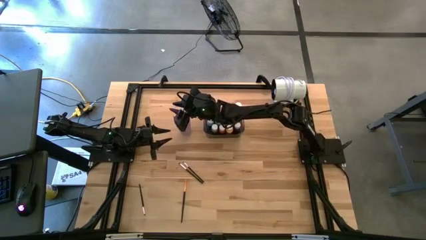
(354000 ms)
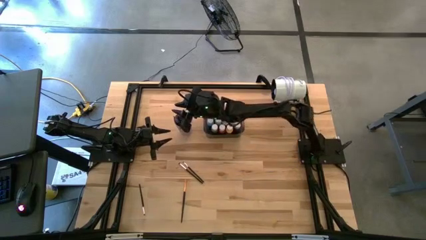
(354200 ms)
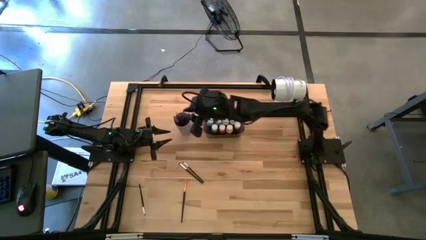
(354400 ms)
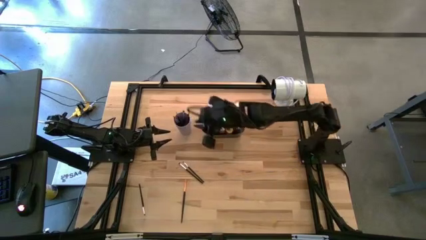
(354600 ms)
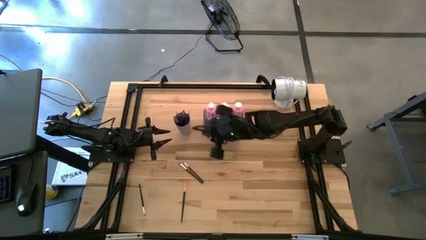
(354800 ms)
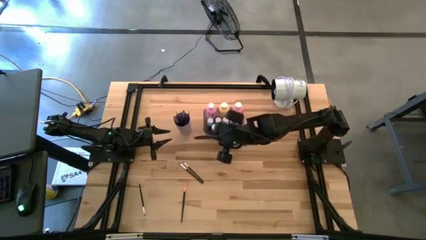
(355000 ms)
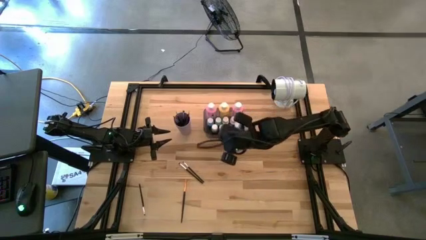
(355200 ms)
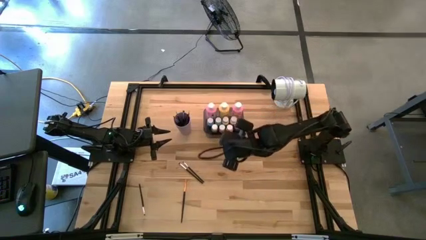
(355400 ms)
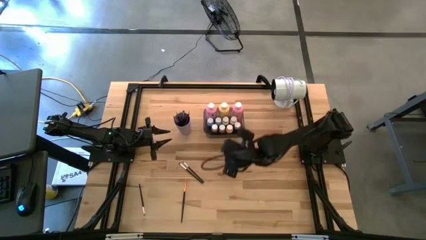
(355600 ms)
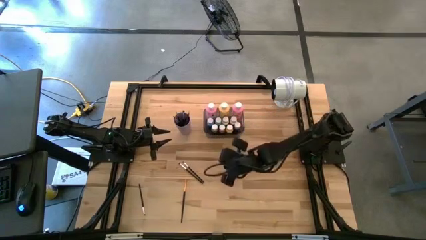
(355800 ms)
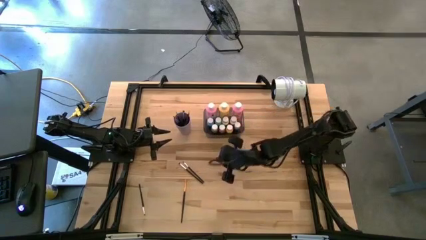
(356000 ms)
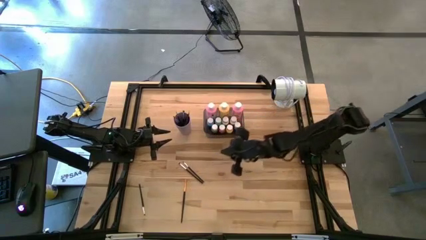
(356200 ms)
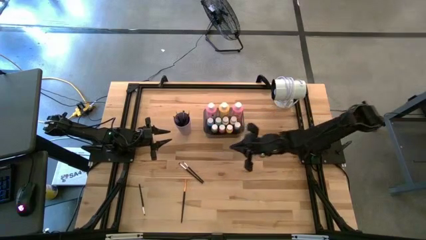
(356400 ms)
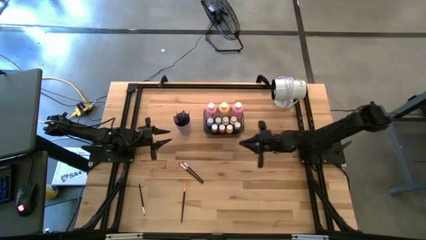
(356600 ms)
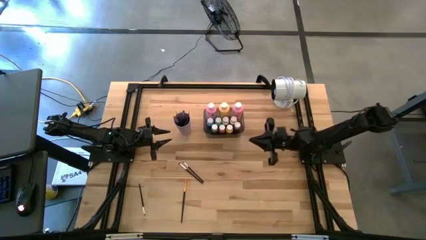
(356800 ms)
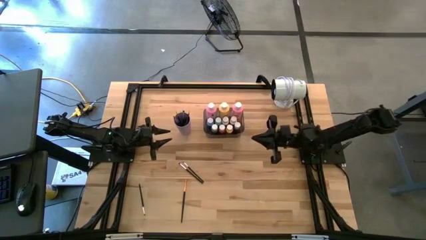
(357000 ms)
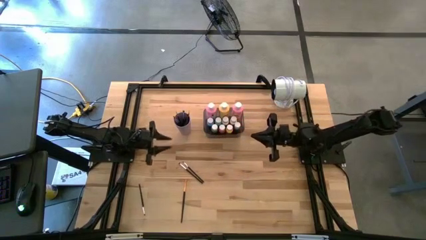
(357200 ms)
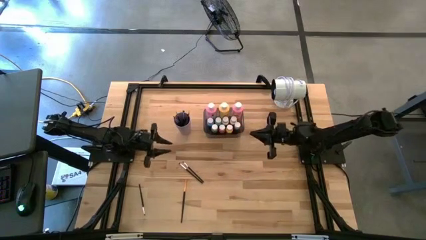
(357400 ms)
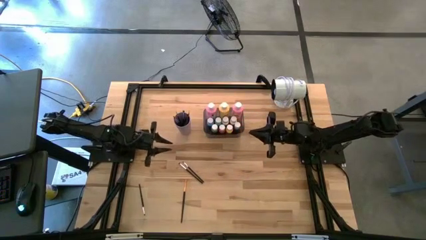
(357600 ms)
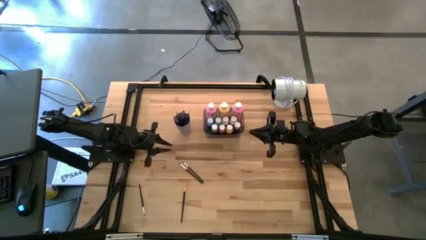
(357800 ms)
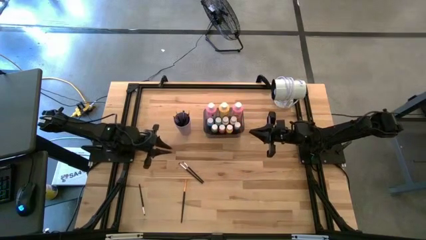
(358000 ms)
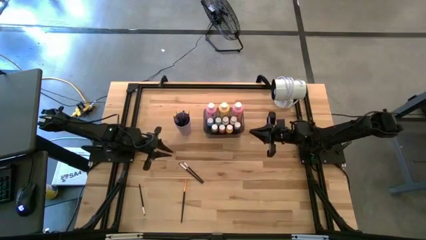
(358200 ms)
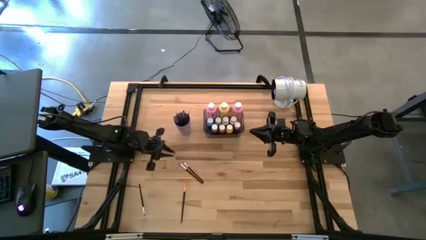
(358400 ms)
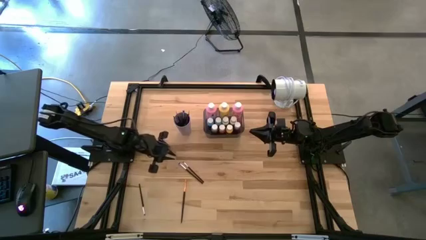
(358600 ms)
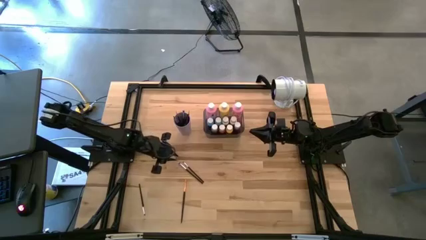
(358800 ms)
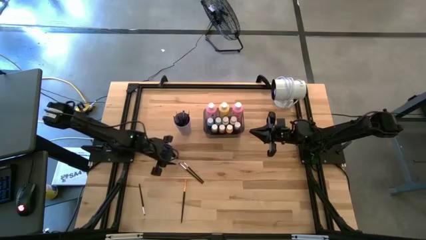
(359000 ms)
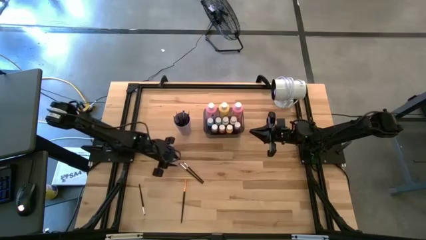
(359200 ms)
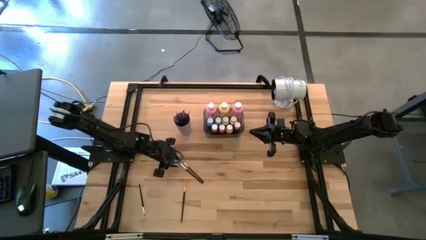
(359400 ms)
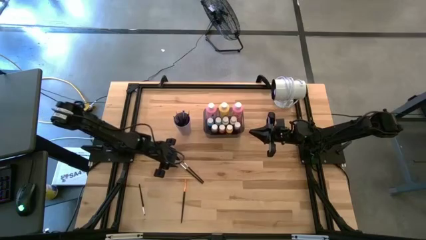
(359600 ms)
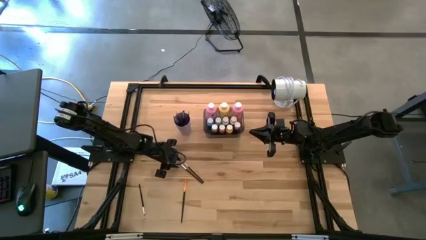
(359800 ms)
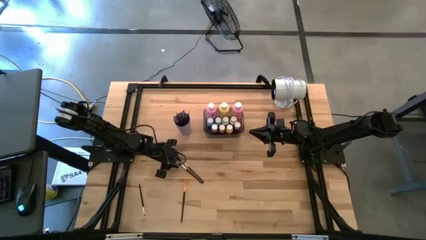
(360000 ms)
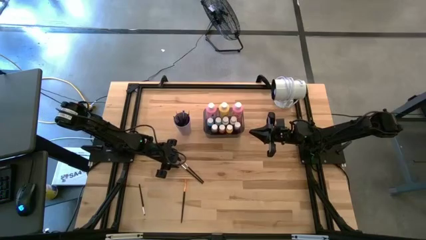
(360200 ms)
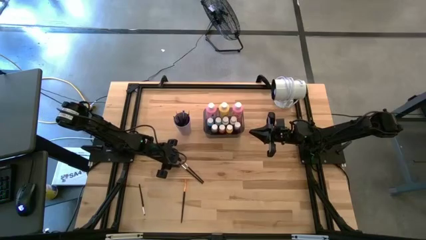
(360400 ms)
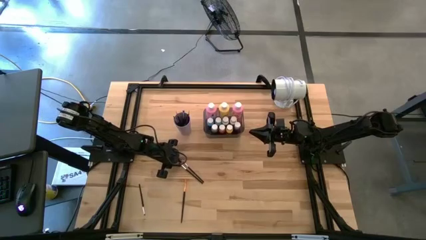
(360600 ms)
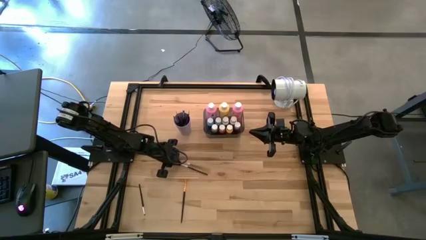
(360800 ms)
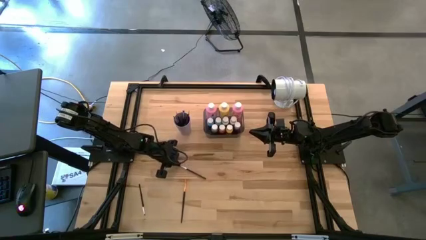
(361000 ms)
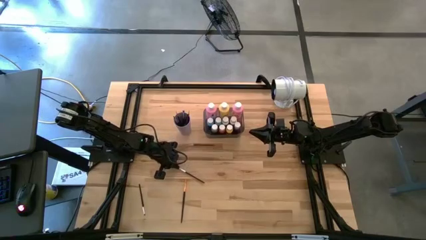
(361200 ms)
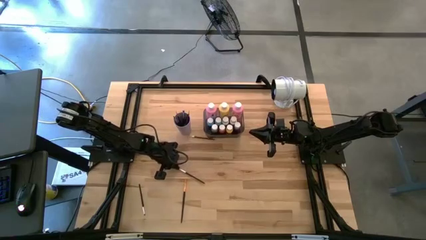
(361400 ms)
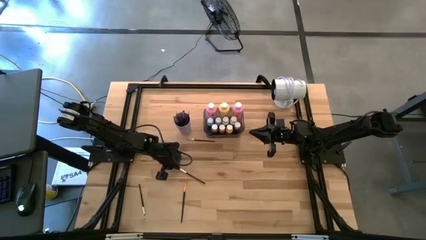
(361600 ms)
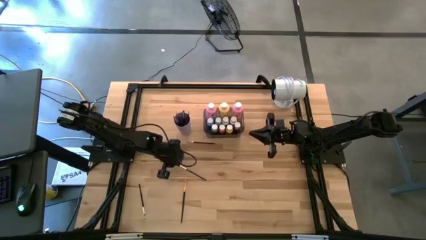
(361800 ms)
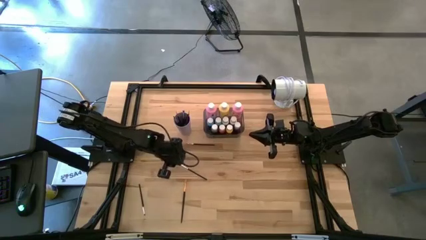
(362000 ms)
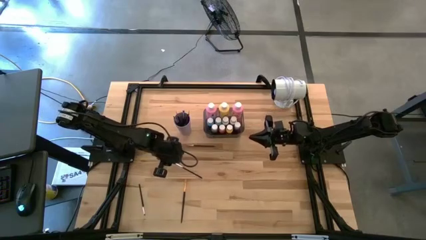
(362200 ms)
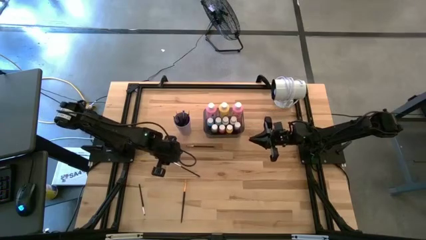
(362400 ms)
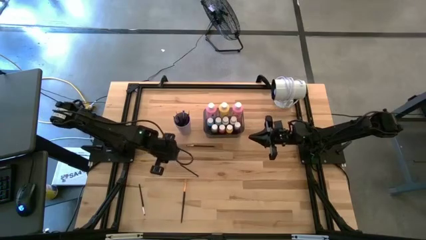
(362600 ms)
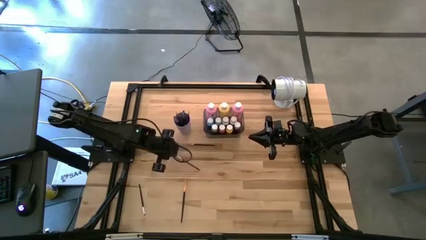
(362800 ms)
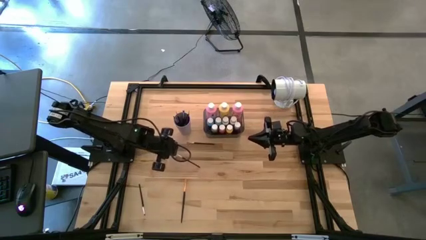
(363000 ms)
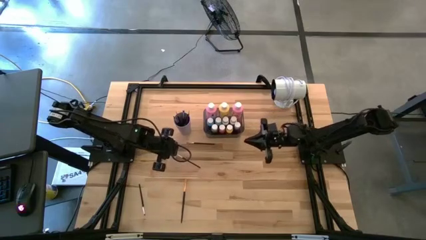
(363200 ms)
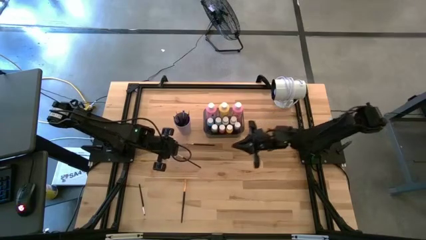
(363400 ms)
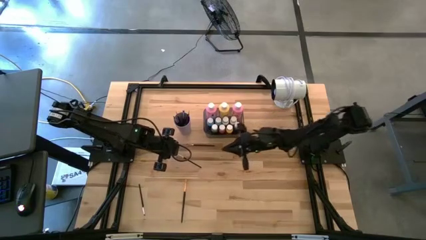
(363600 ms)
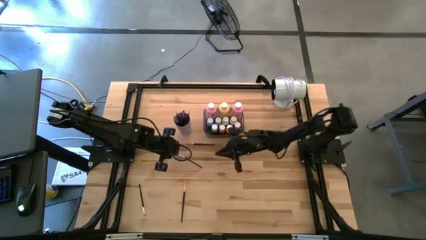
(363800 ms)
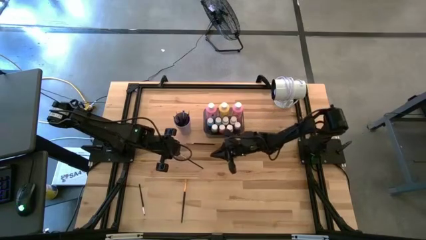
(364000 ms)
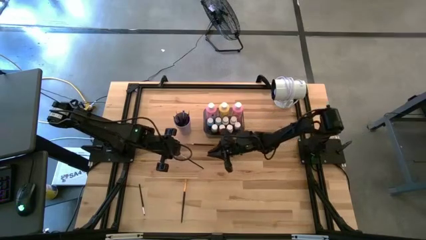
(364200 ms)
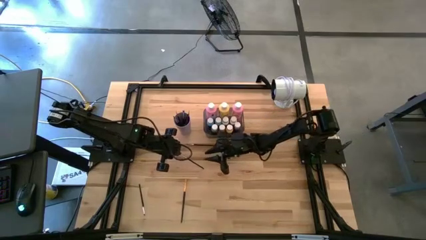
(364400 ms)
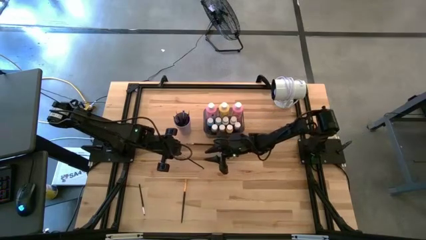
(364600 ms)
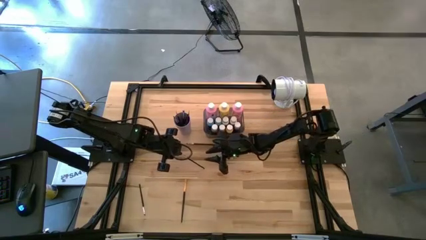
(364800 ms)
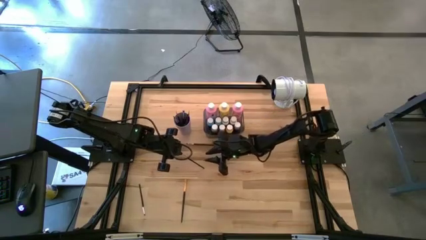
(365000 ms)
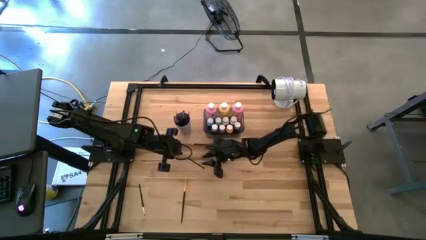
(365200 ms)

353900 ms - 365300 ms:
Task: Pick & Place Paint Supplies
Put the silver paint brush into the purple cup

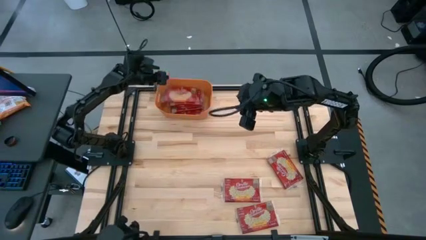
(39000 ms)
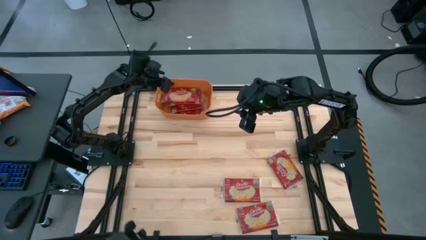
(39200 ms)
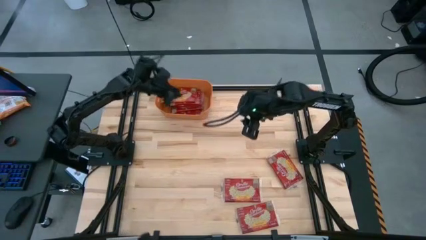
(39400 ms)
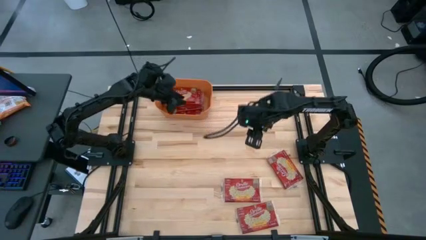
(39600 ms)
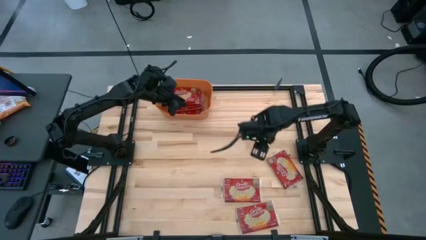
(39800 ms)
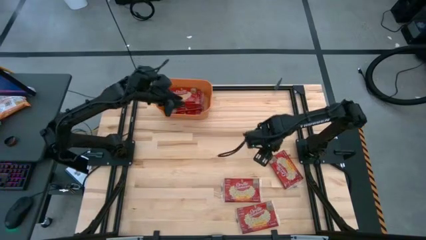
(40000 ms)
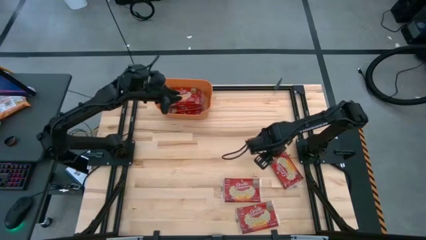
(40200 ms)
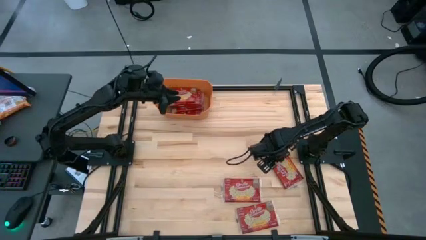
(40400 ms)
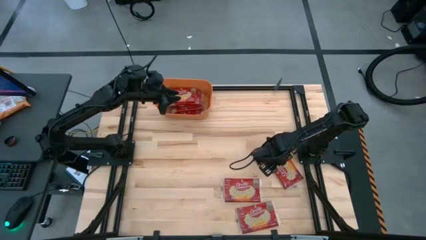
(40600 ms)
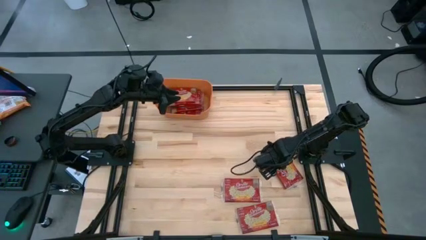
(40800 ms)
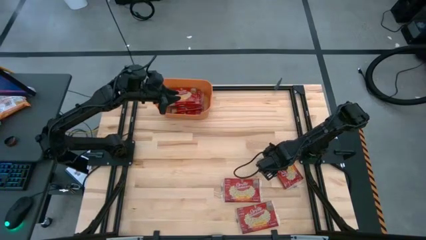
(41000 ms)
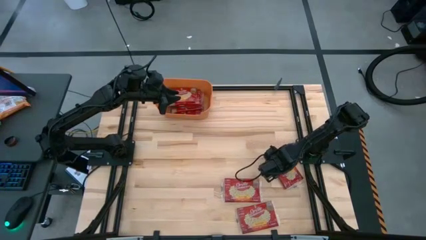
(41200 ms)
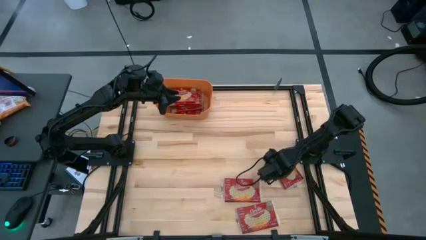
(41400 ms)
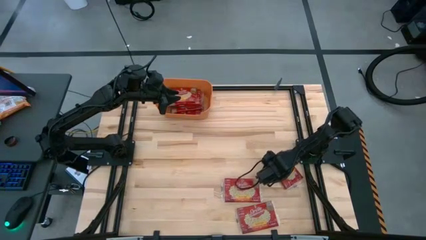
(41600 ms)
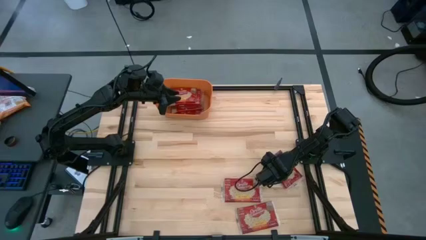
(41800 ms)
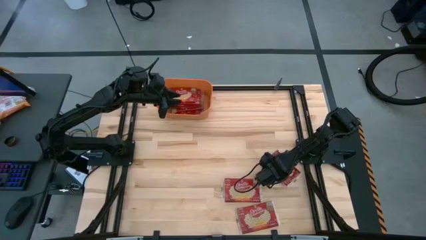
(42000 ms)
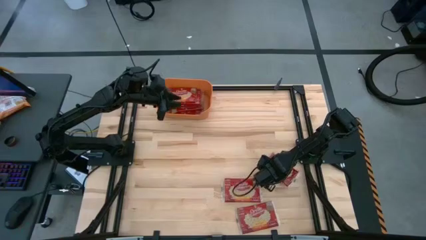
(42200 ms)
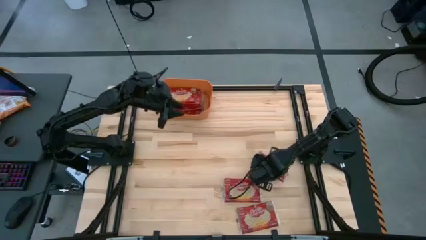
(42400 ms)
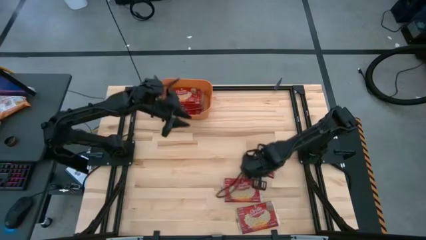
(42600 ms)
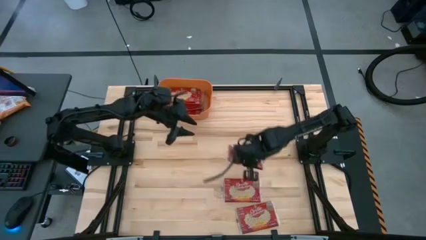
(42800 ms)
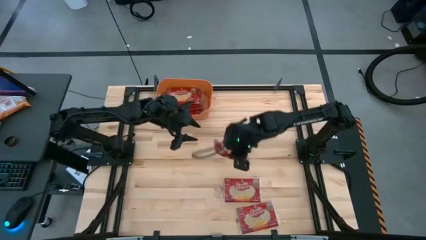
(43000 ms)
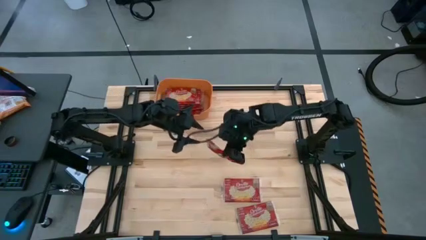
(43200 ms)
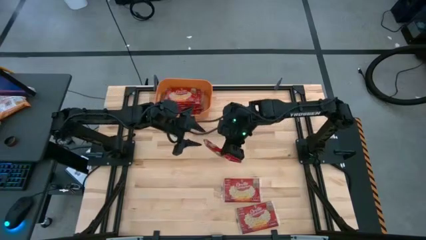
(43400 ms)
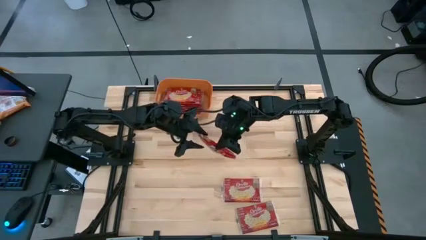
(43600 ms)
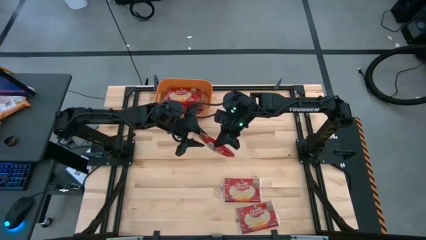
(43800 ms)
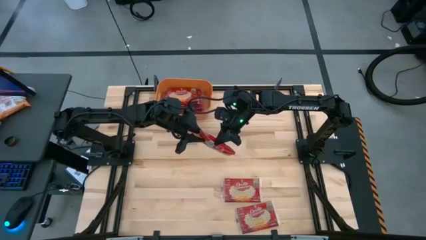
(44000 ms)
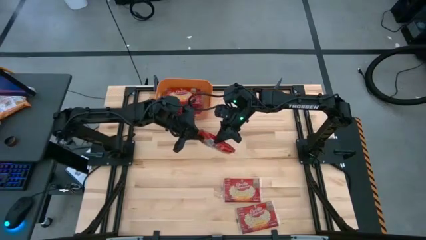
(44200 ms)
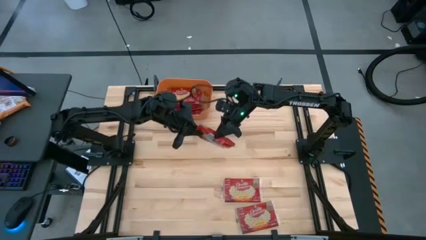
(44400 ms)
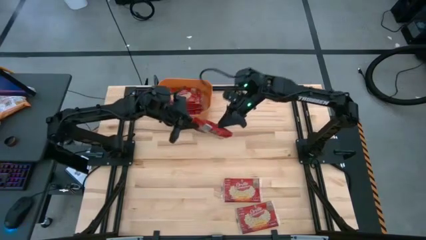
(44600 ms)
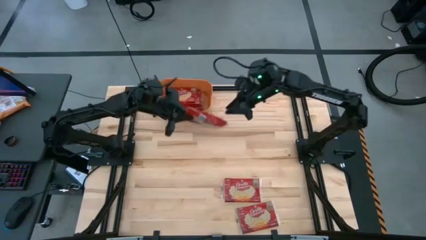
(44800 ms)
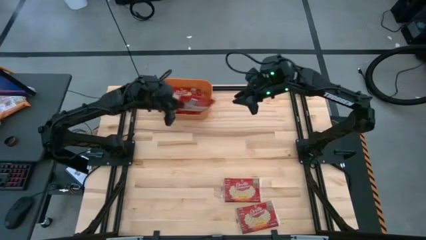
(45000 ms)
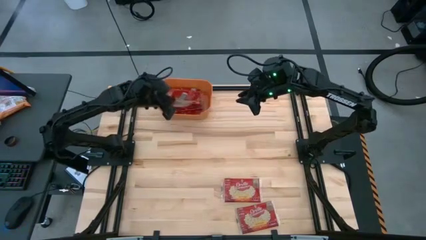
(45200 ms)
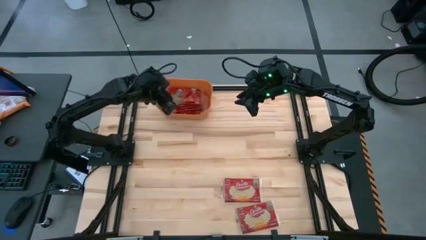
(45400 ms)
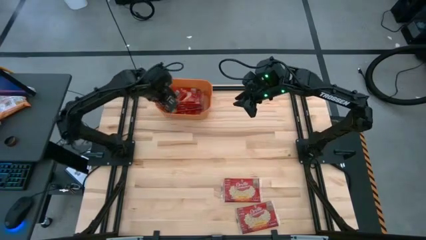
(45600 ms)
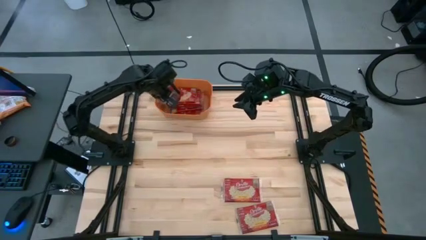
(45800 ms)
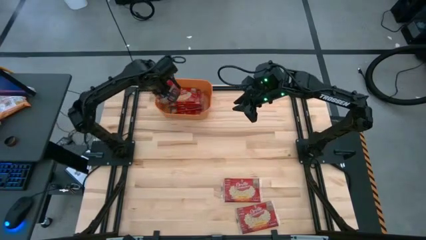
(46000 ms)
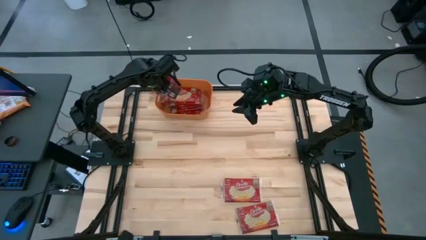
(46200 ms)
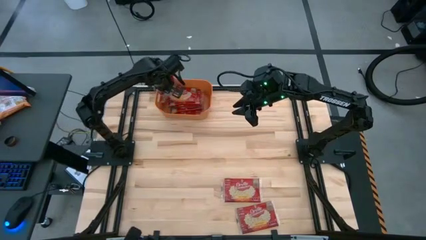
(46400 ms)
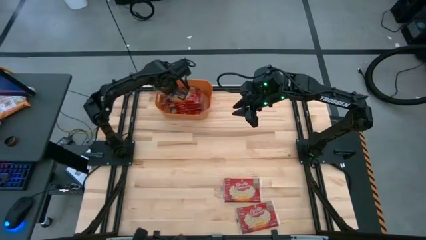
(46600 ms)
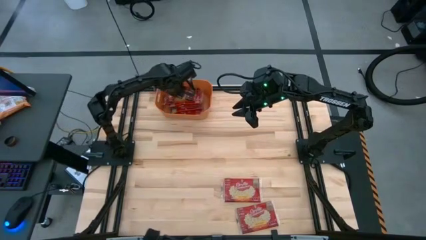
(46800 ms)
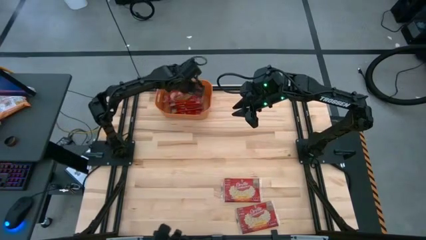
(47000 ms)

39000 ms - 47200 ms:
Task: Sort popcorn bags into baskets
Put the red popcorn bag into the orange bin
